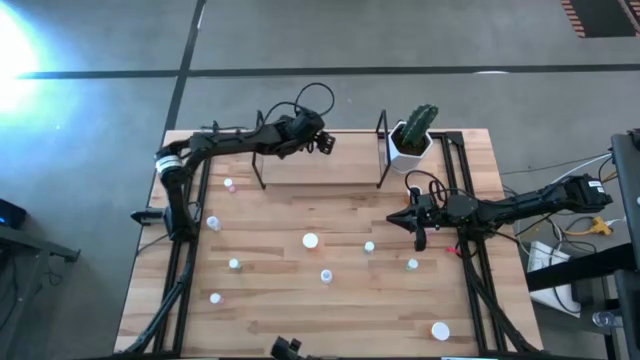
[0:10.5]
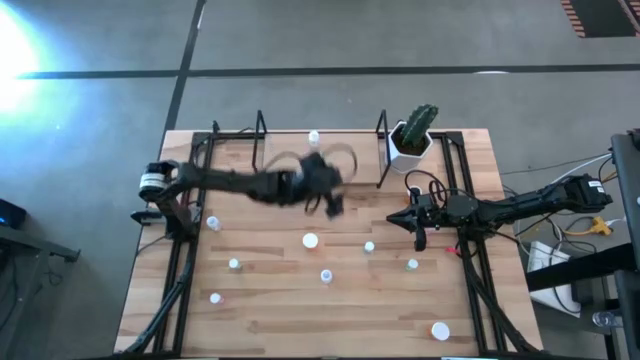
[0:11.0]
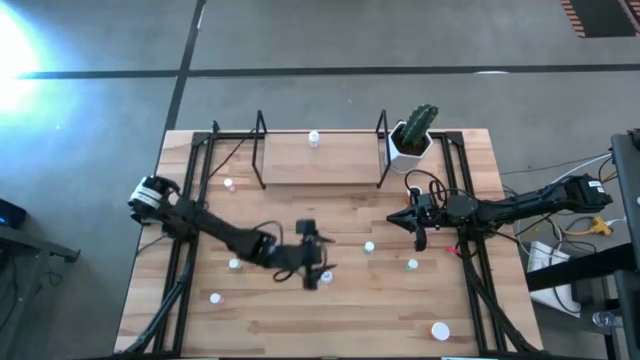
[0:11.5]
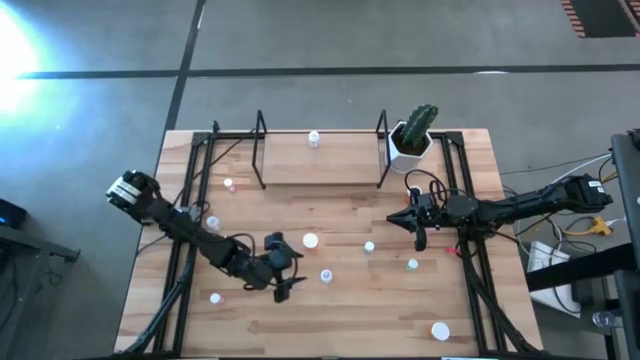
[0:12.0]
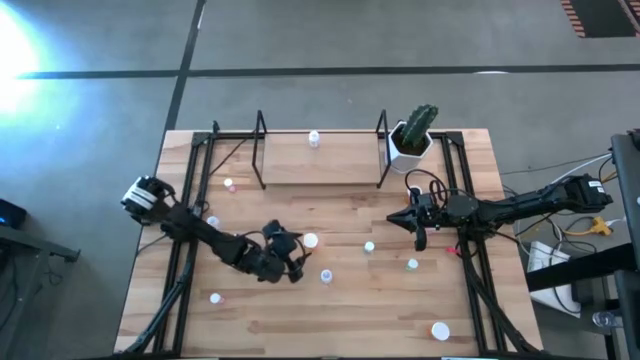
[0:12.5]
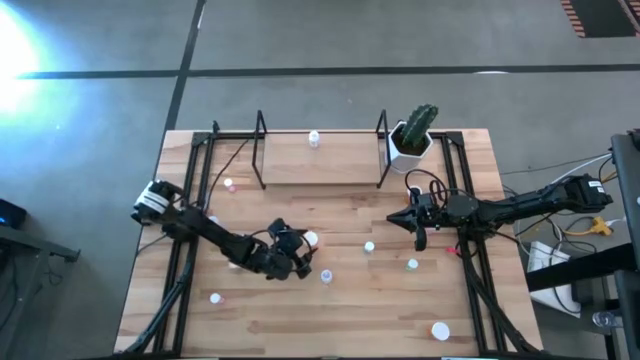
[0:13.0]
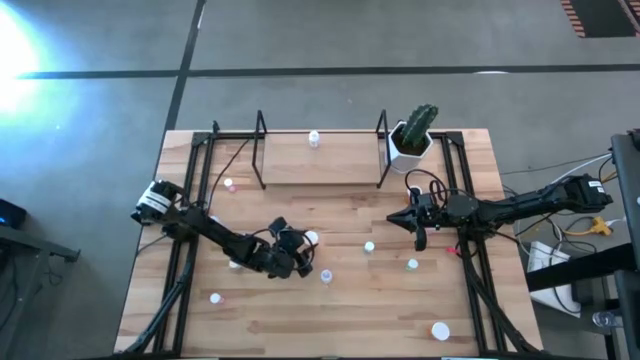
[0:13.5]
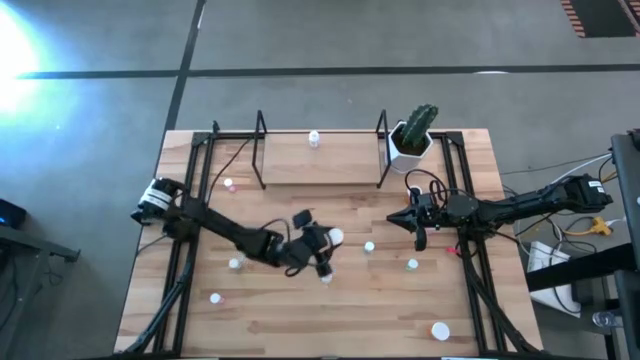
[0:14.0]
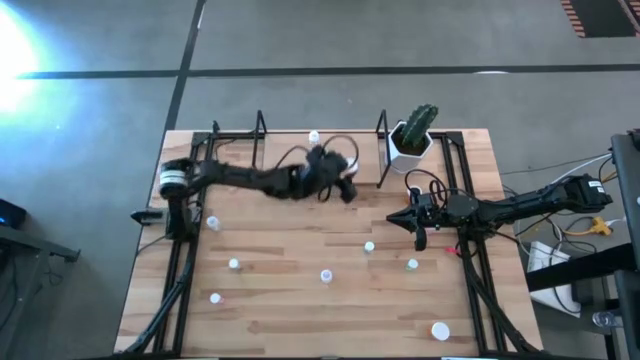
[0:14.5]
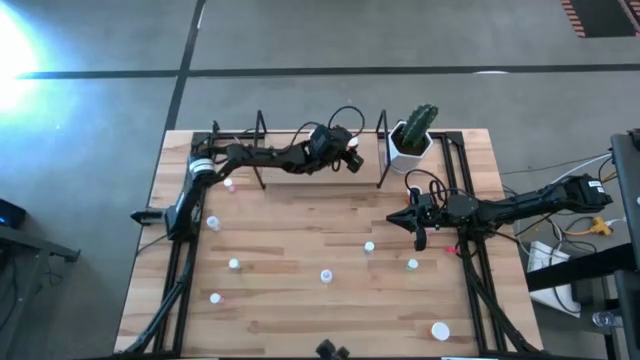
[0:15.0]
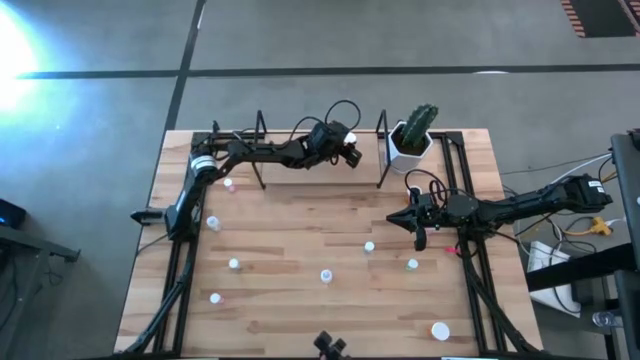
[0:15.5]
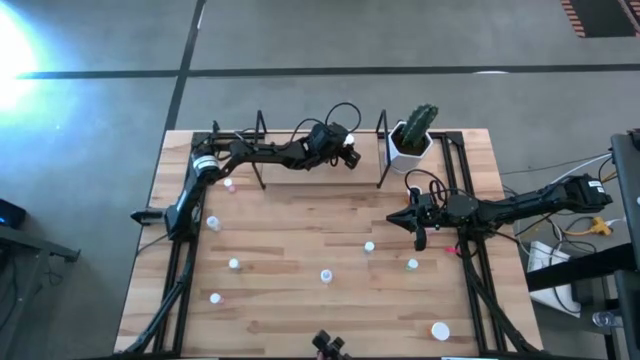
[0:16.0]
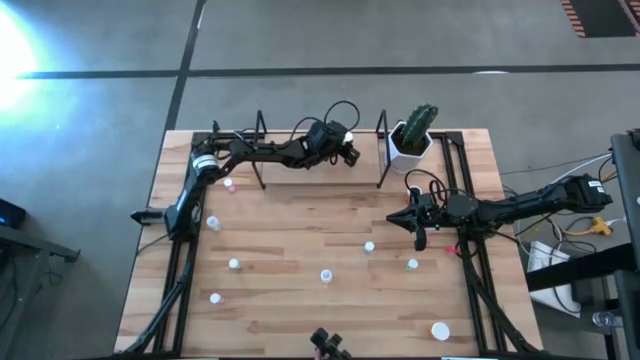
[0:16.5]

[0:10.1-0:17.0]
Task: Pick and place medicine bottles onto shelf by color
Put the middle orange medicine bottle on the shelf

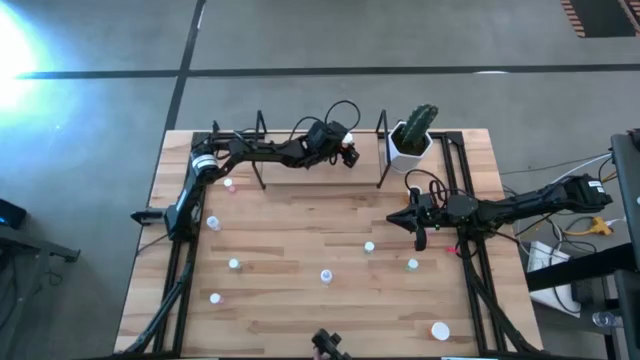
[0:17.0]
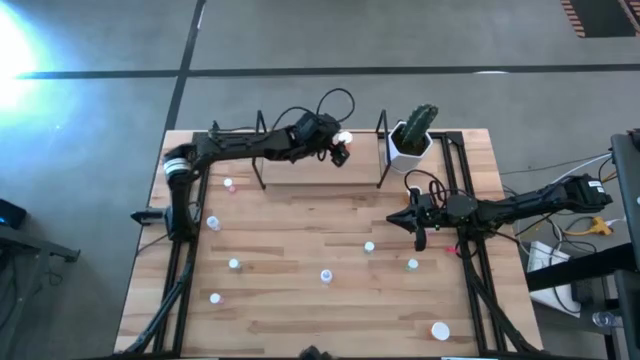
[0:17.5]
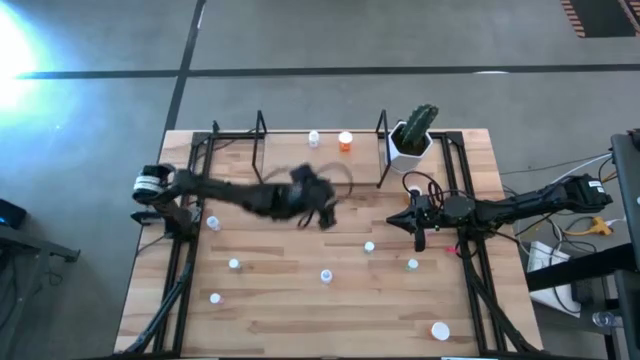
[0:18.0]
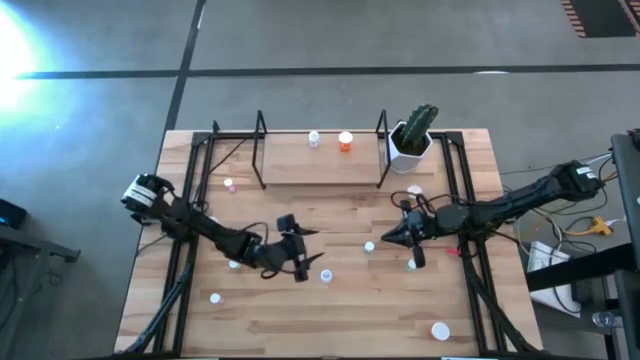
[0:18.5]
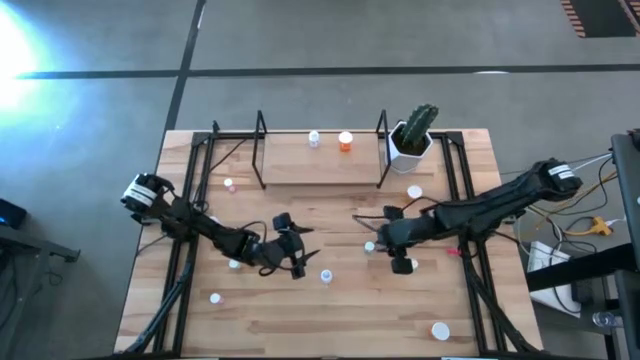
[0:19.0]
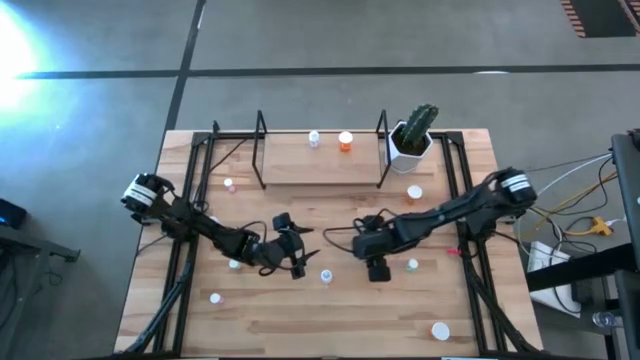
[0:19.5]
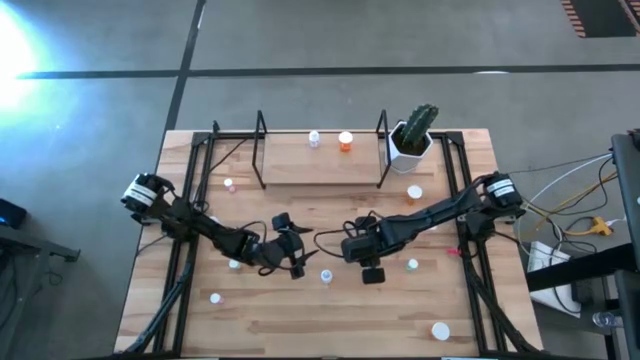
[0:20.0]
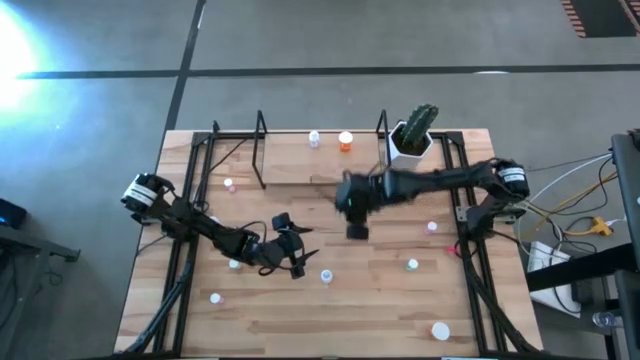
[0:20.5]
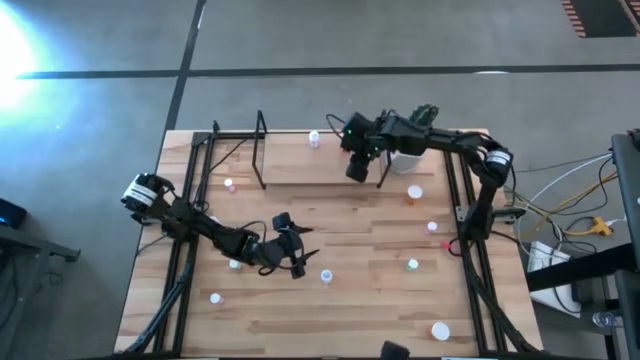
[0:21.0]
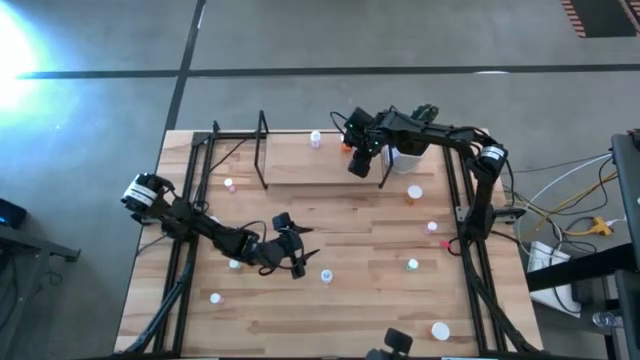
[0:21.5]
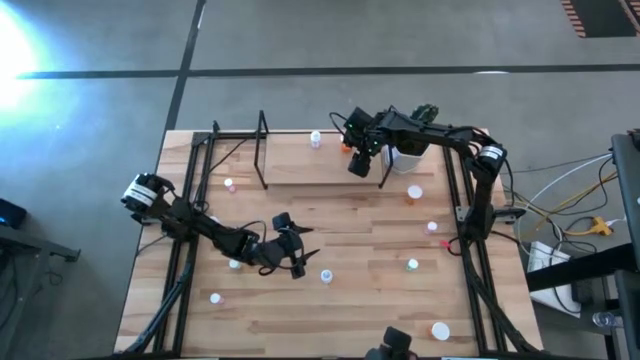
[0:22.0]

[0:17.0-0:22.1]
Put the top green medicine bottle on the shelf

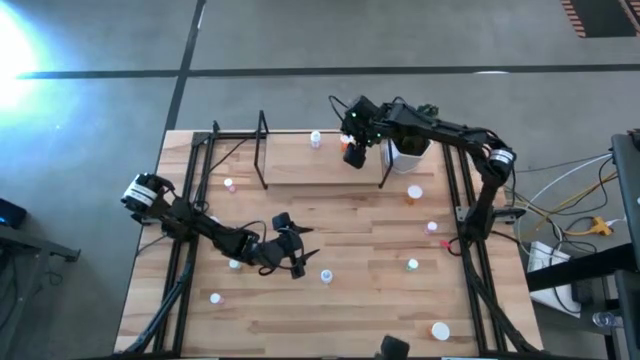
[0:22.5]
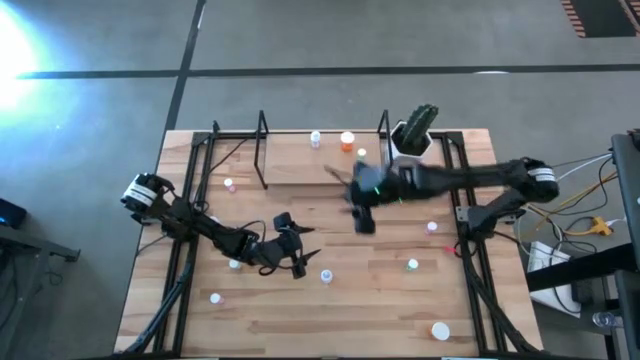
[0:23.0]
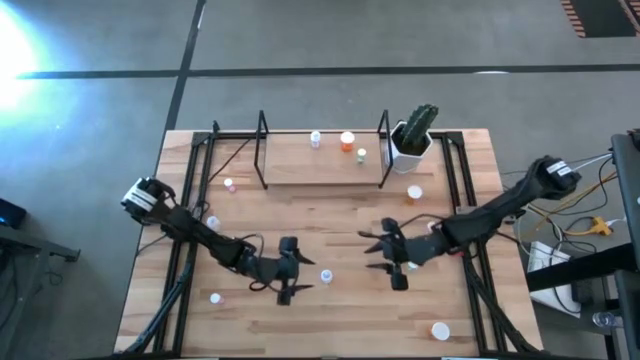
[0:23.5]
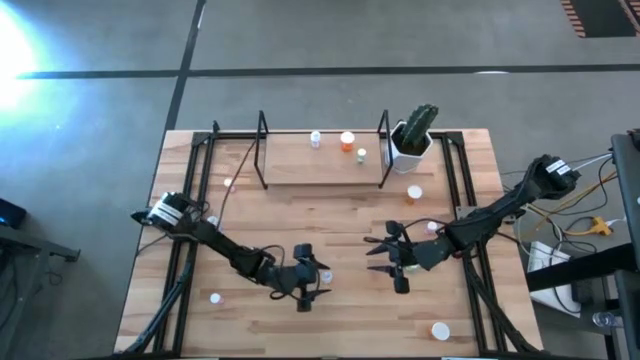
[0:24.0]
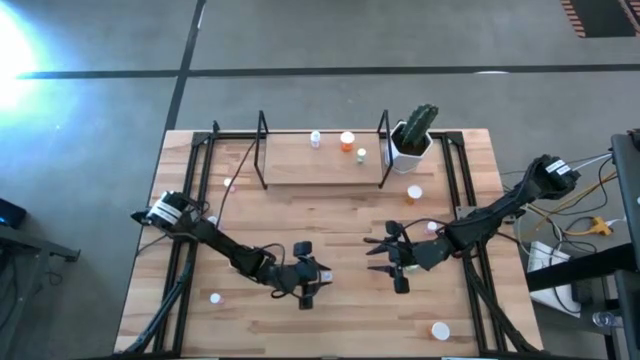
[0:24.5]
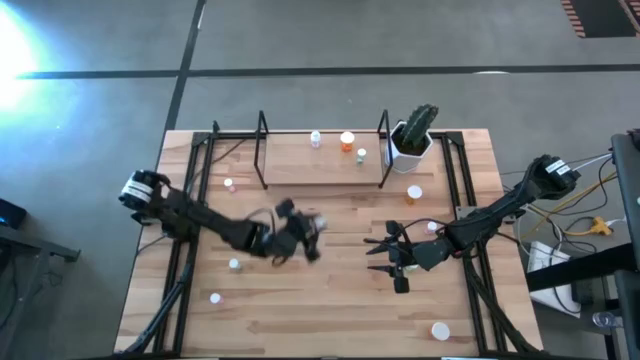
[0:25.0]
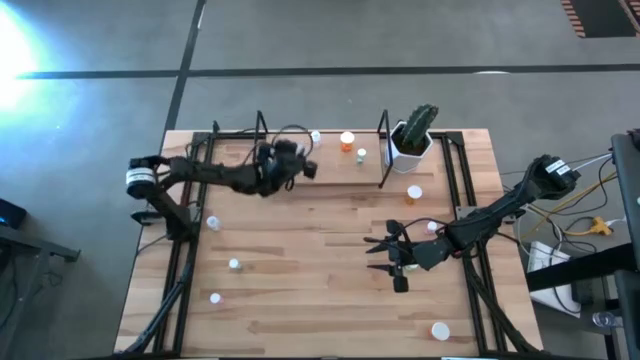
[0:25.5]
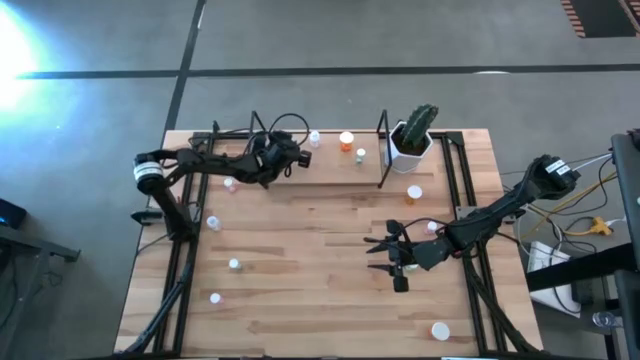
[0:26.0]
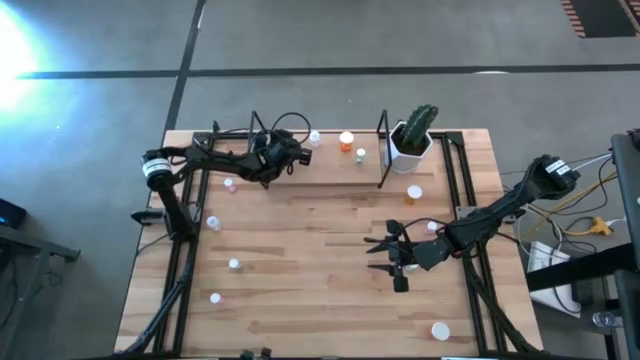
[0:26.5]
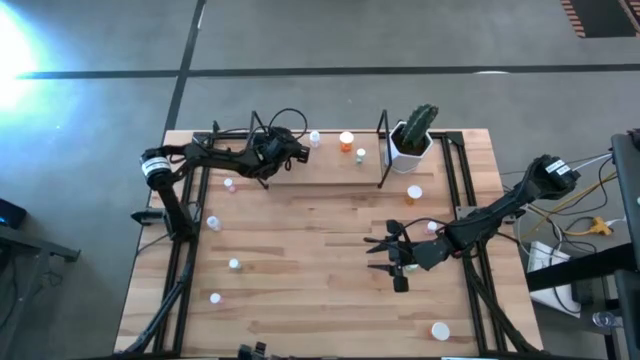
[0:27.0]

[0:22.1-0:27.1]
Put the right transparent medicine bottle on the shelf

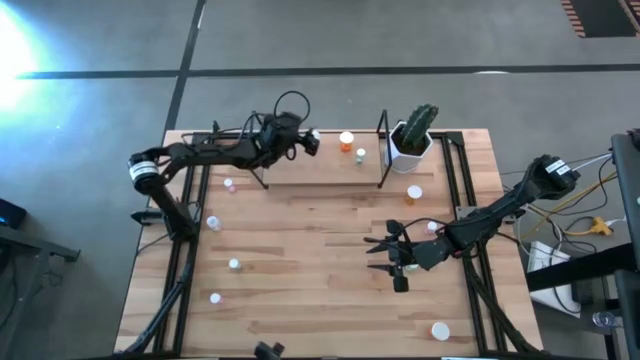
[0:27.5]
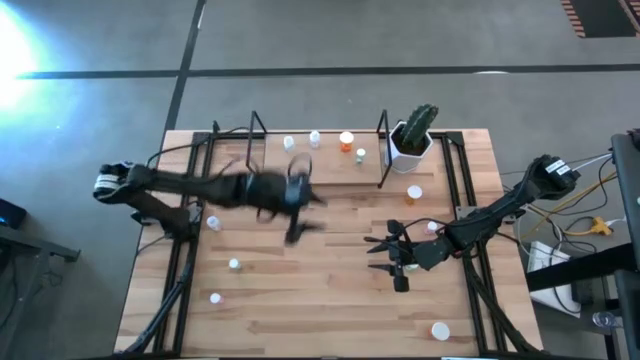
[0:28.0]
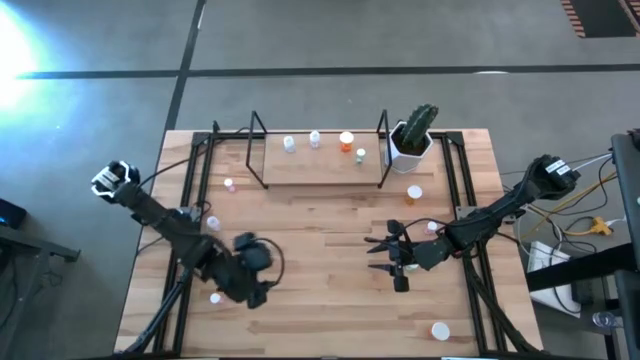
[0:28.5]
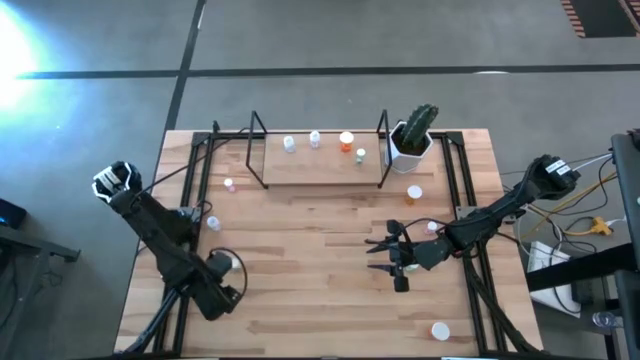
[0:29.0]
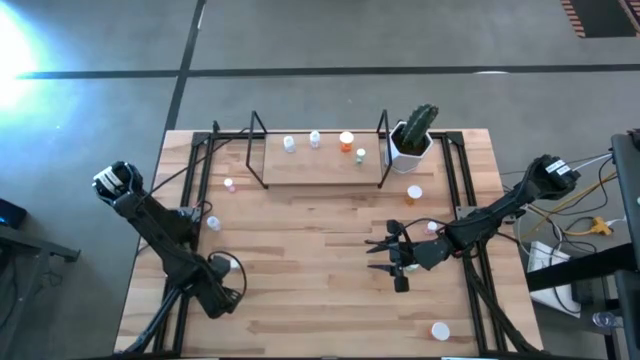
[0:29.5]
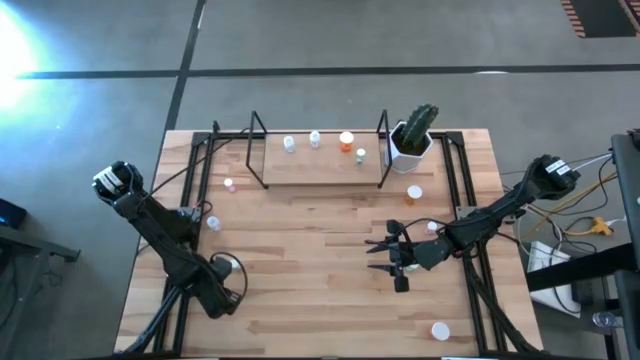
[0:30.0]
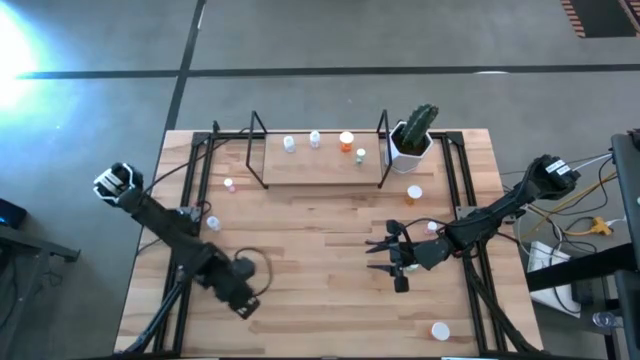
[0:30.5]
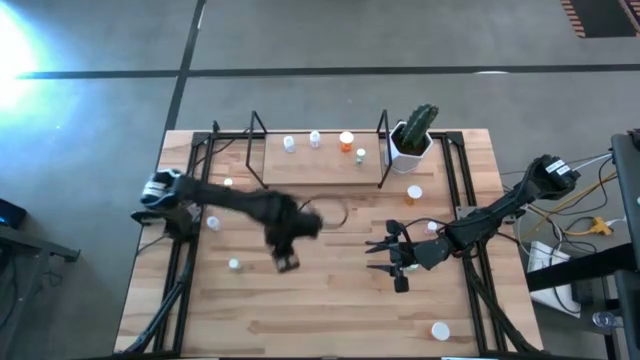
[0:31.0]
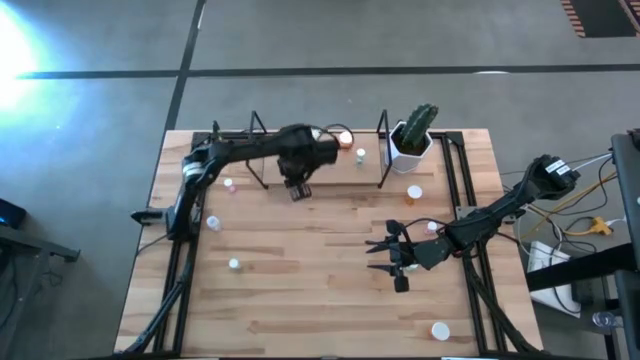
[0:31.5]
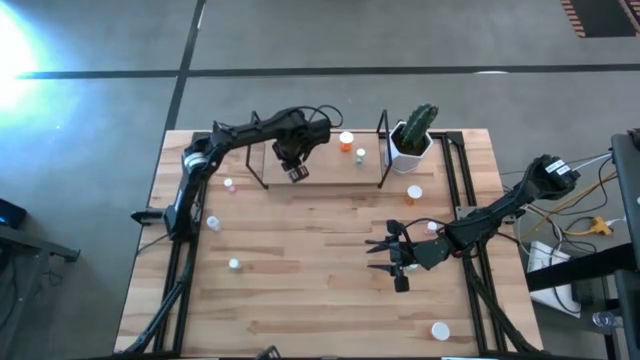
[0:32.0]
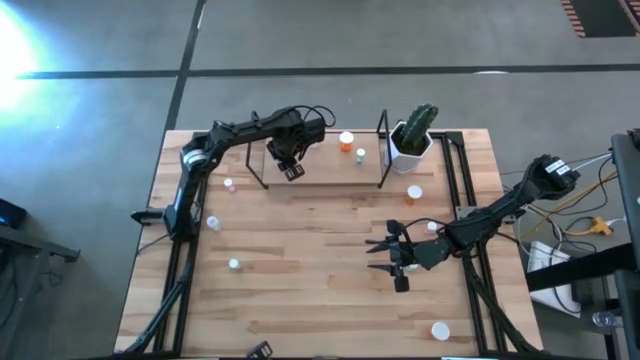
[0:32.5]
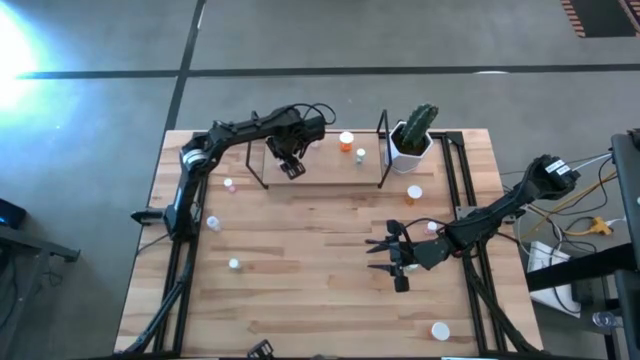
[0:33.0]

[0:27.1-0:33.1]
Put the bottom pink medicine bottle on the shelf
